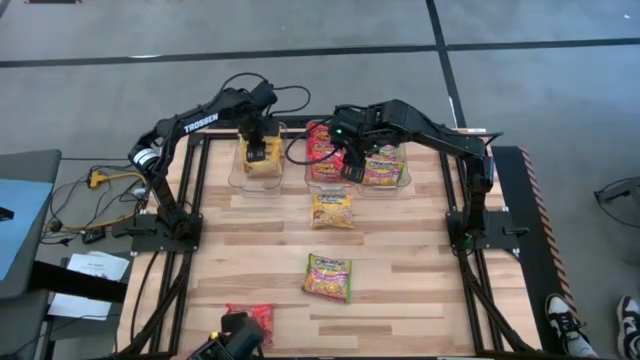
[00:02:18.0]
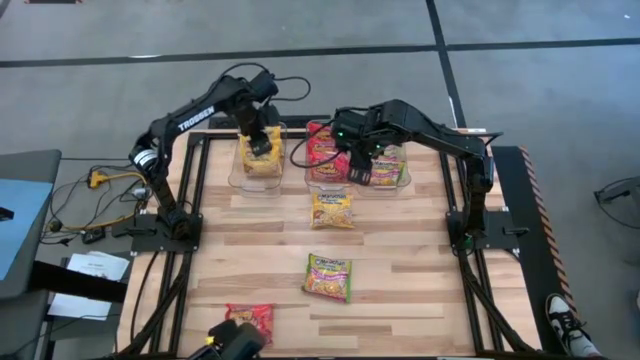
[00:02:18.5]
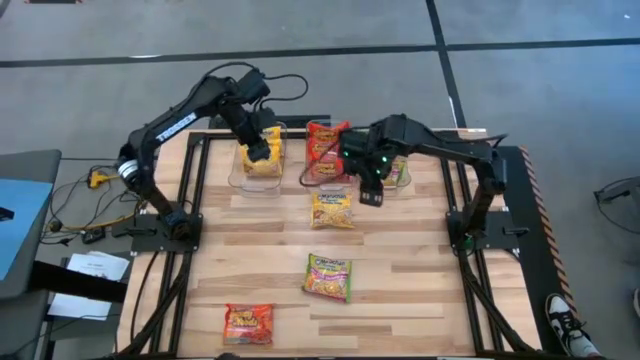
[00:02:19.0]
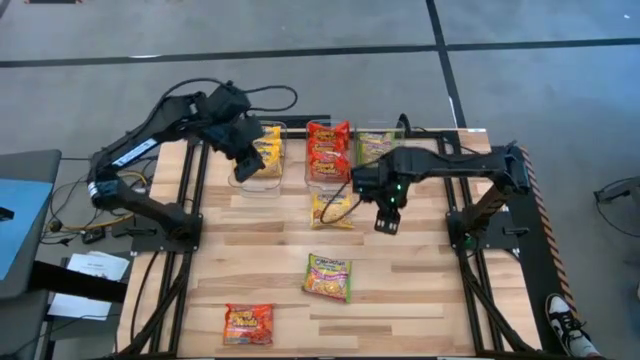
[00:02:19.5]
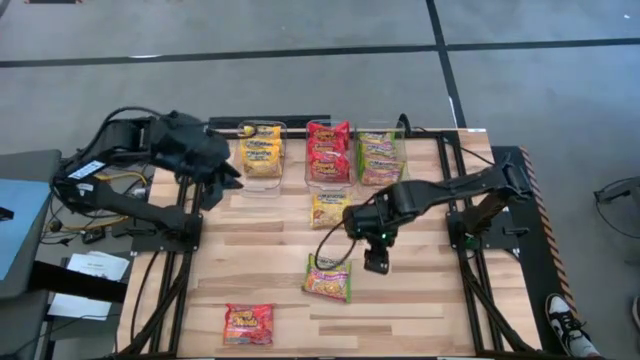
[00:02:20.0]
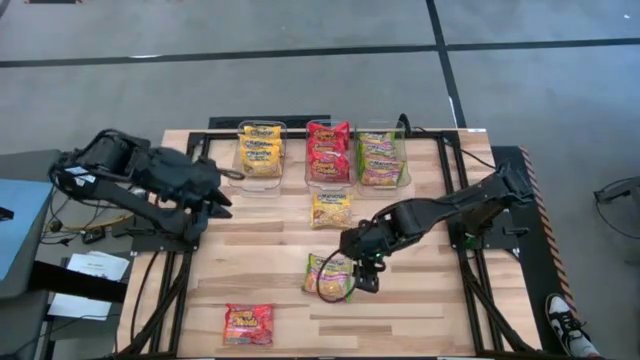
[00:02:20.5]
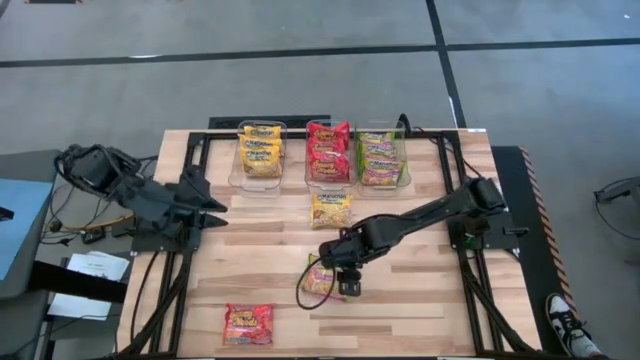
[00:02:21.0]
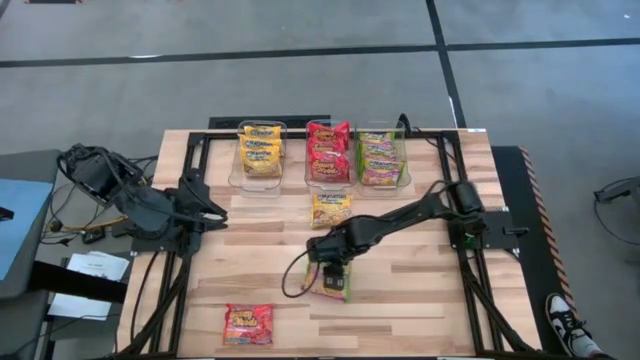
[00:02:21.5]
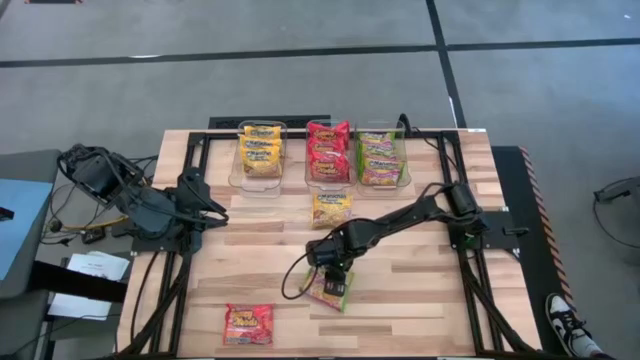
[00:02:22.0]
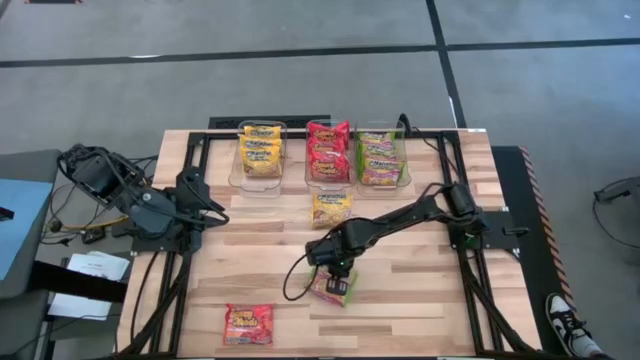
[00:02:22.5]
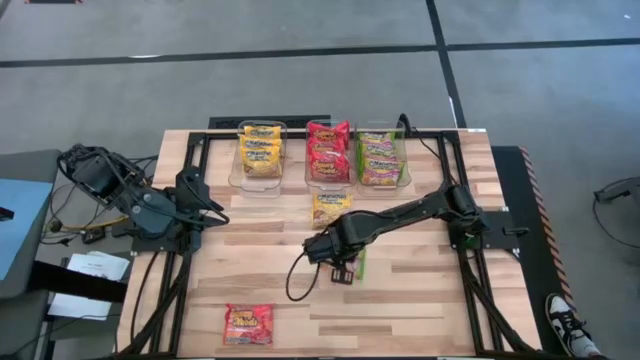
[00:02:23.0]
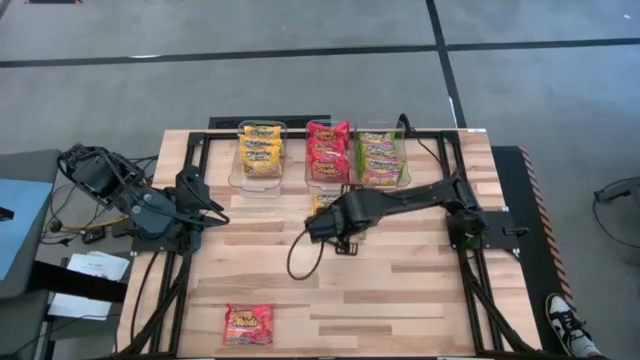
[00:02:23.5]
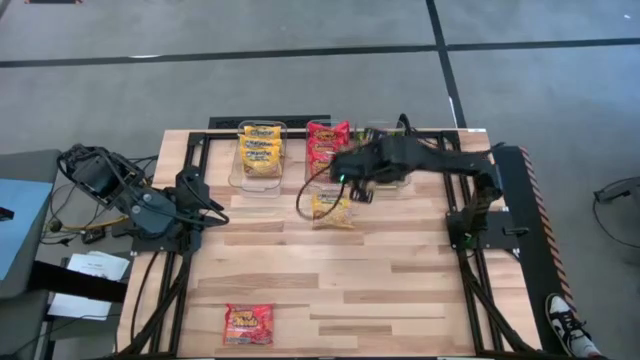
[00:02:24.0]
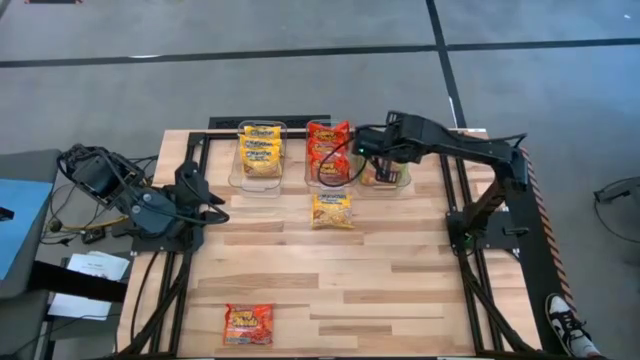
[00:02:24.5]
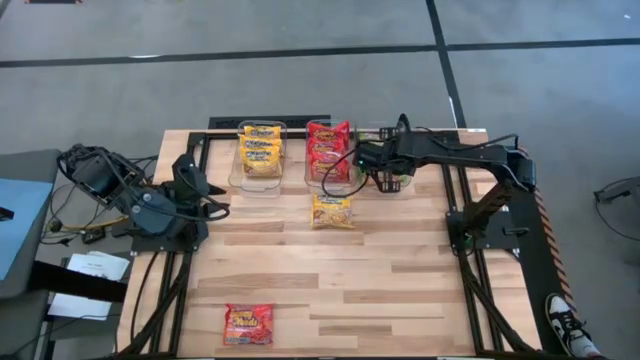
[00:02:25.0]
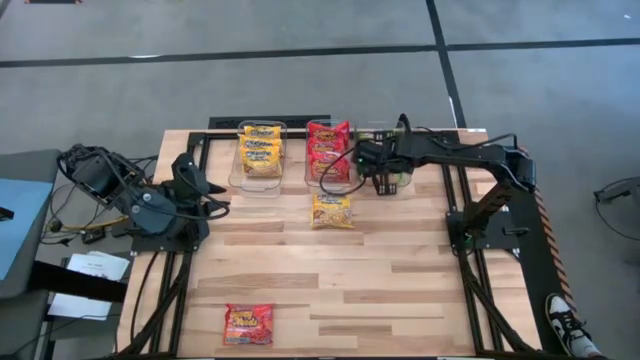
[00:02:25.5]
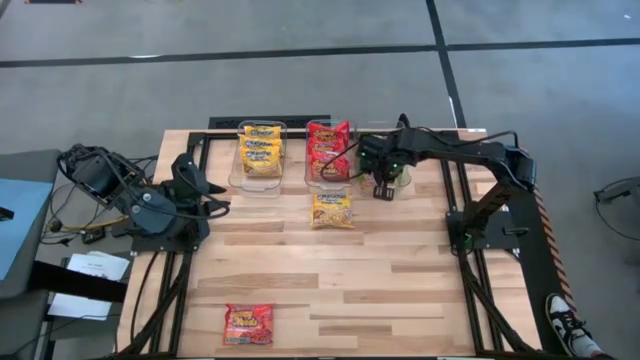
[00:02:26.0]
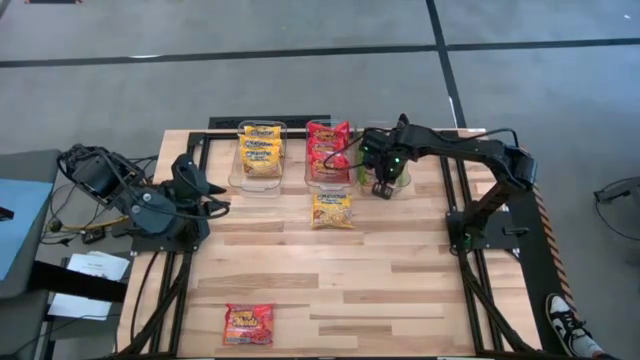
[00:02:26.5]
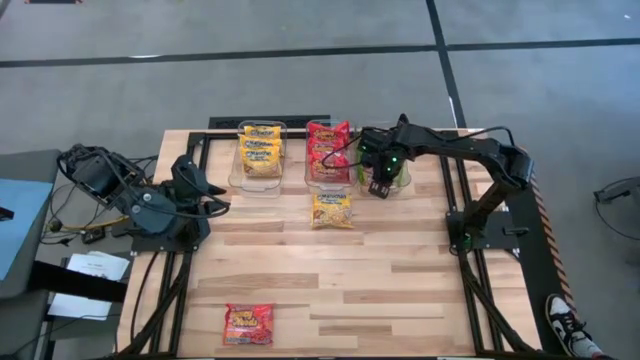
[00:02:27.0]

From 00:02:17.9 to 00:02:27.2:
Task: Sort Maruchan noodles
Put the green noodle pack into the right transparent bin

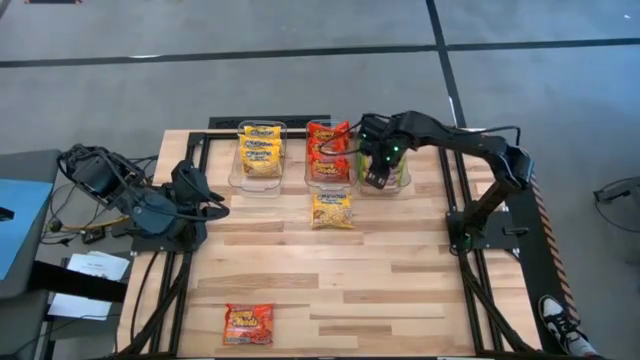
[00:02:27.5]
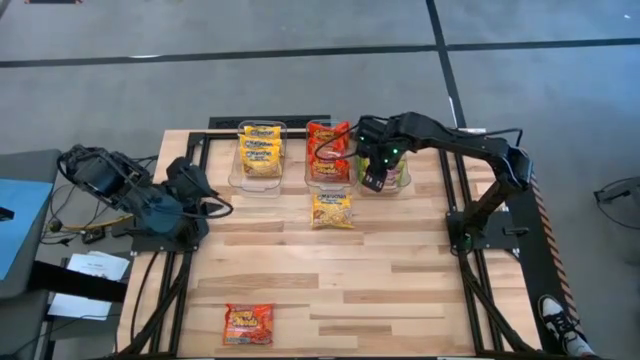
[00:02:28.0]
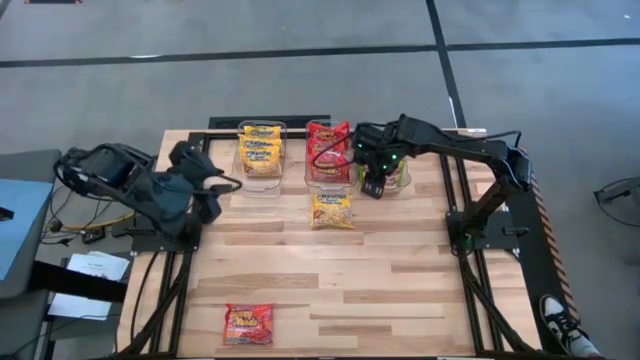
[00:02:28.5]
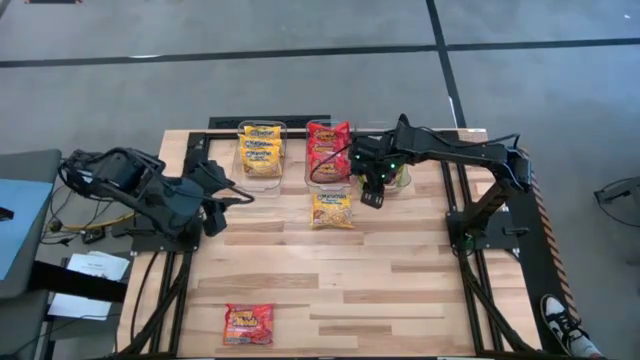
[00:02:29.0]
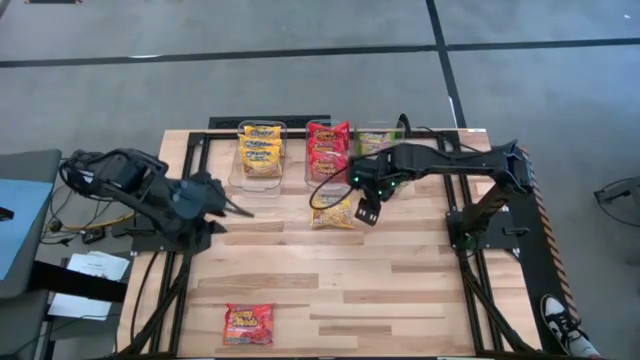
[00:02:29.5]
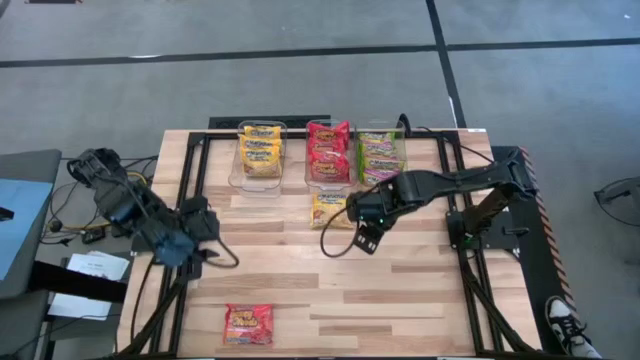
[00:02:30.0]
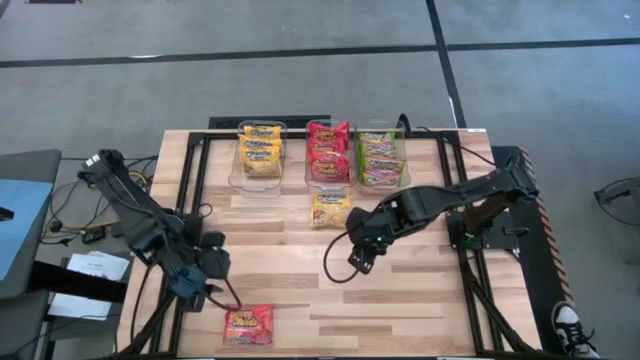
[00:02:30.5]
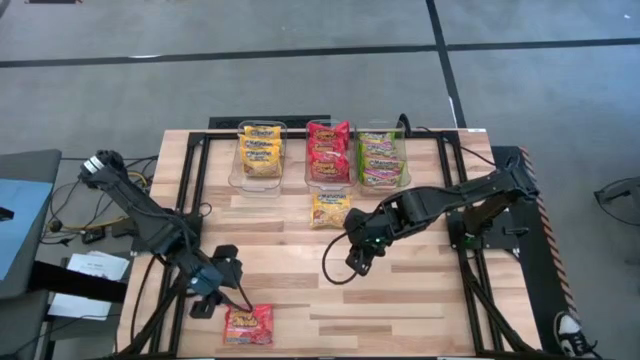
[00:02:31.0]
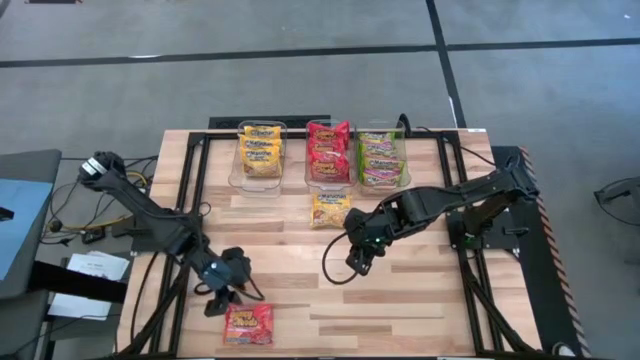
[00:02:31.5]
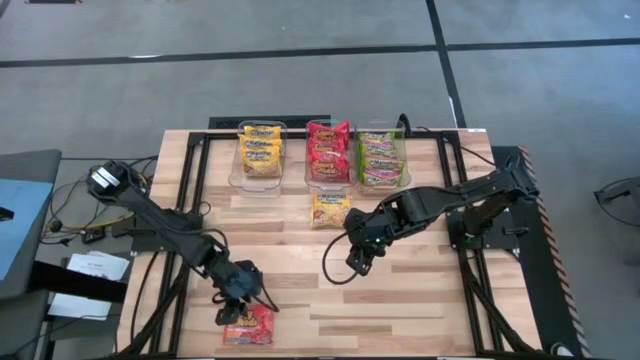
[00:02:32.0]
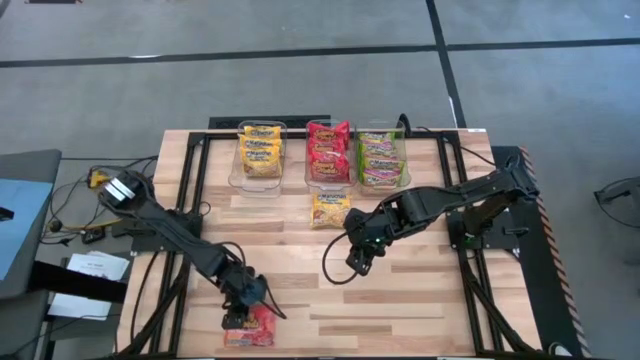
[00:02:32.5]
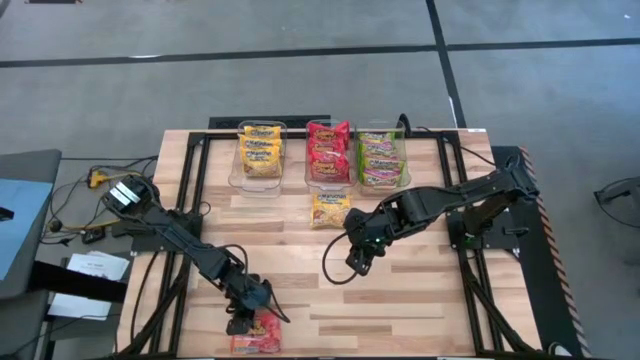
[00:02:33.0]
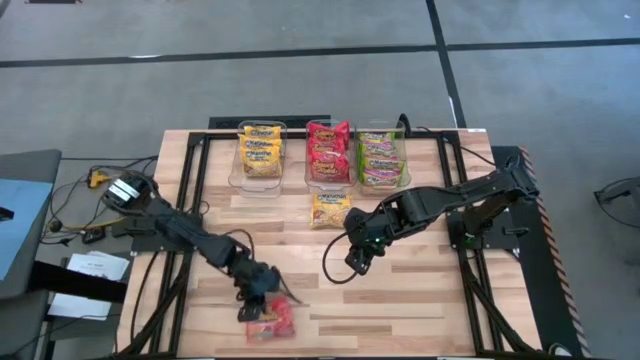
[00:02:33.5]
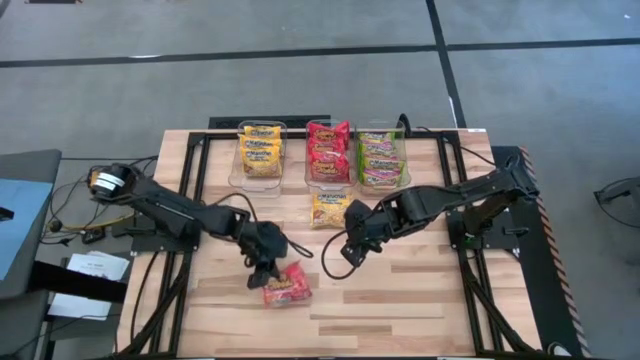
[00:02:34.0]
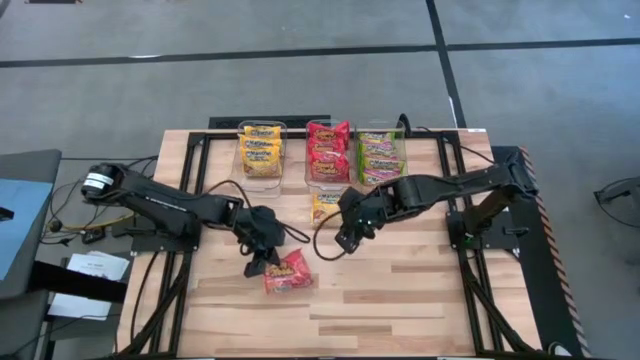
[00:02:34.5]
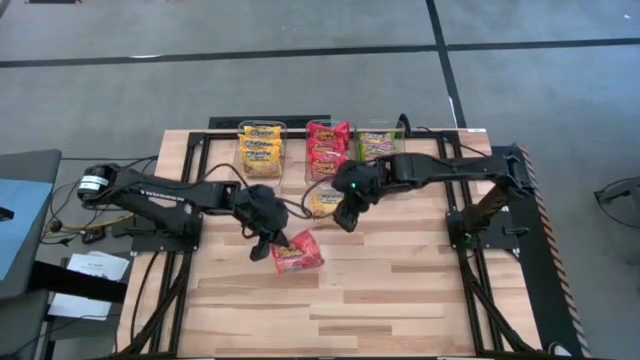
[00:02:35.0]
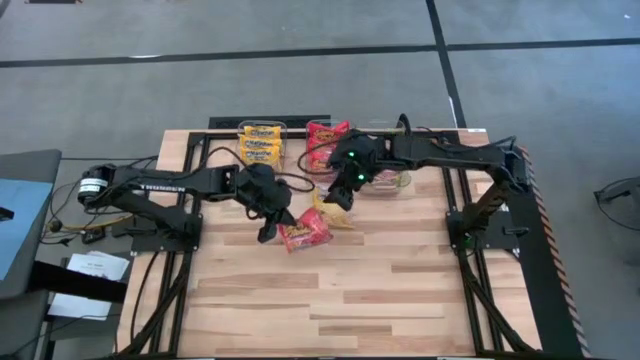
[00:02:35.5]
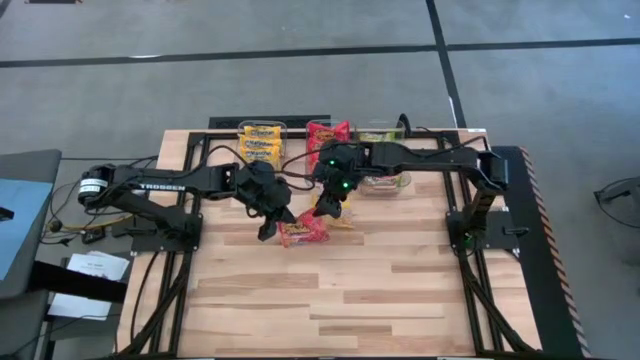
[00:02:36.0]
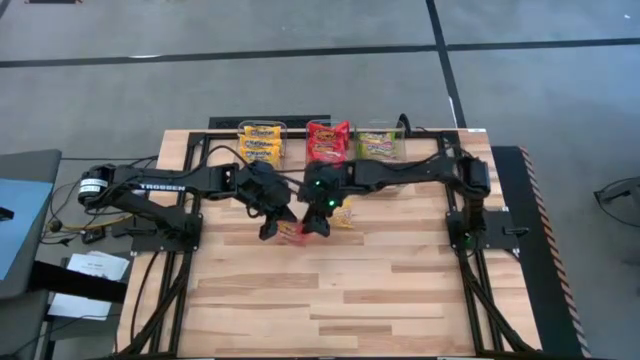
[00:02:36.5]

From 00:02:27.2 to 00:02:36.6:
Put the orange noodle pack into the middle transparent bin
